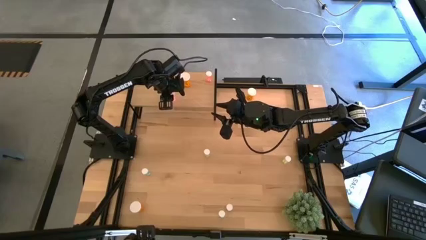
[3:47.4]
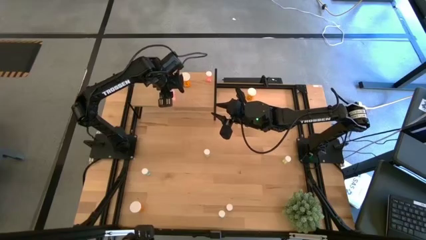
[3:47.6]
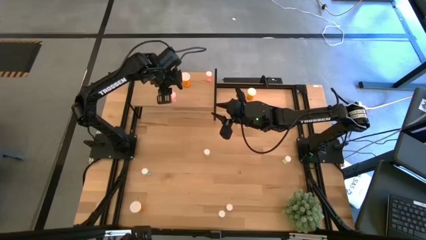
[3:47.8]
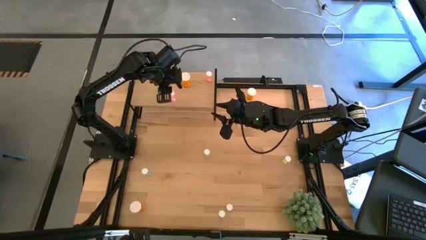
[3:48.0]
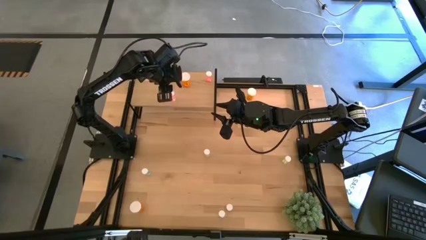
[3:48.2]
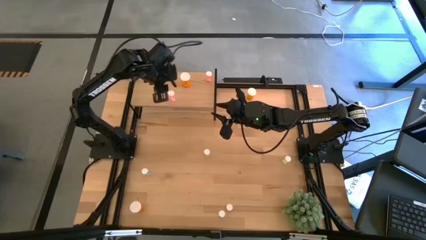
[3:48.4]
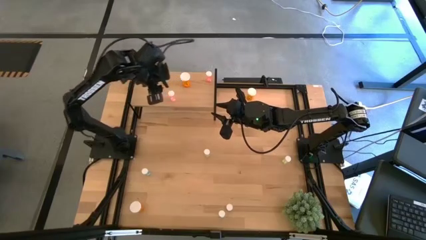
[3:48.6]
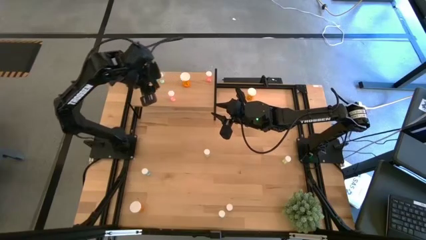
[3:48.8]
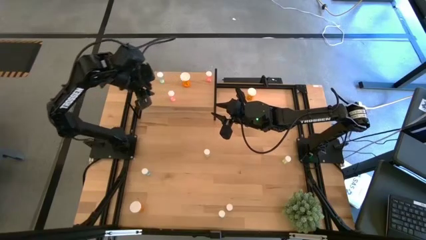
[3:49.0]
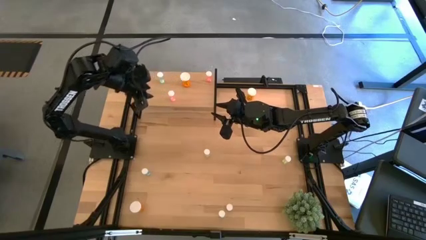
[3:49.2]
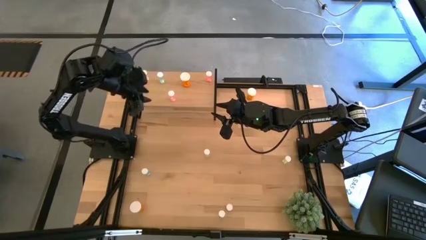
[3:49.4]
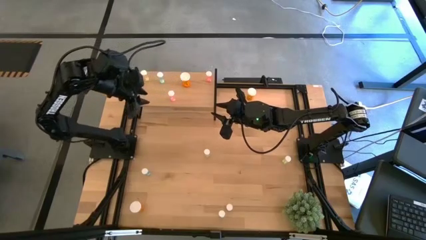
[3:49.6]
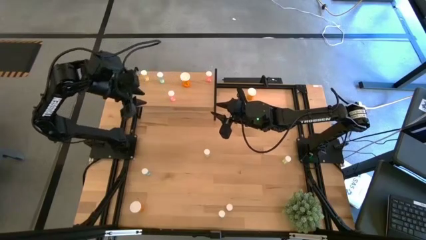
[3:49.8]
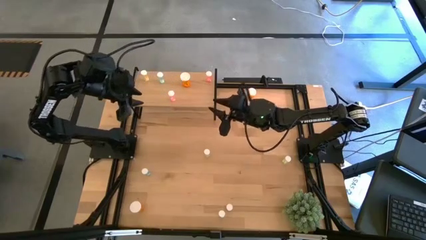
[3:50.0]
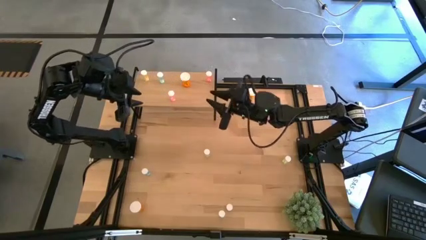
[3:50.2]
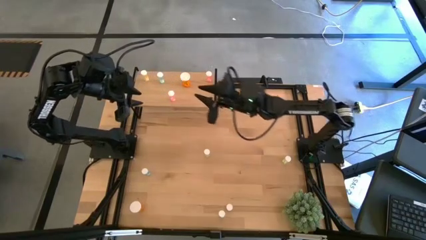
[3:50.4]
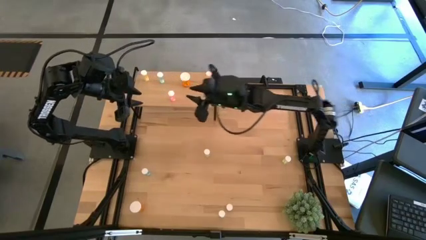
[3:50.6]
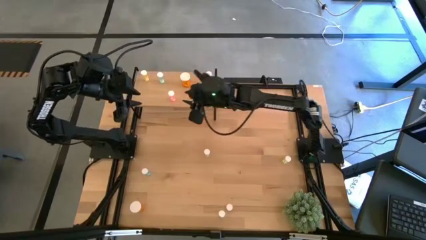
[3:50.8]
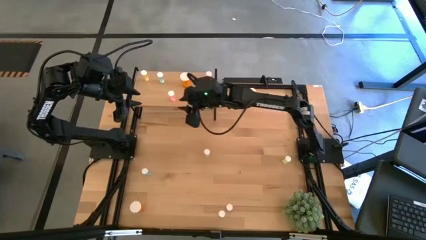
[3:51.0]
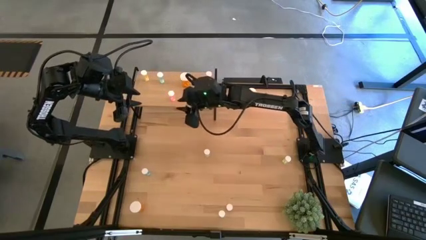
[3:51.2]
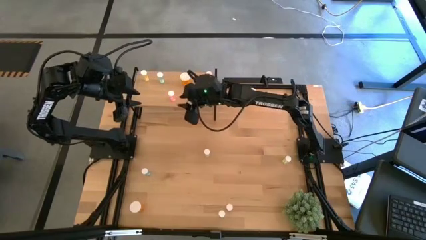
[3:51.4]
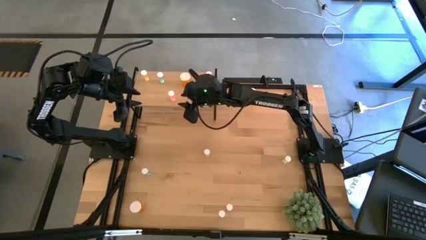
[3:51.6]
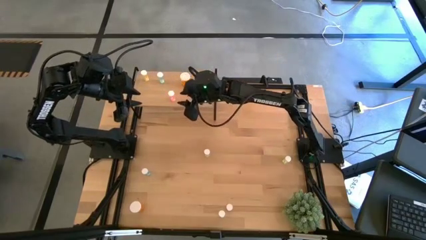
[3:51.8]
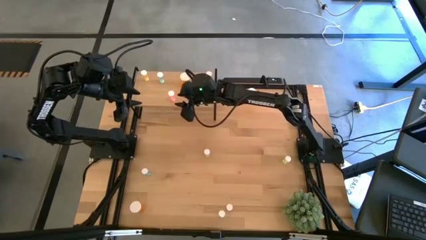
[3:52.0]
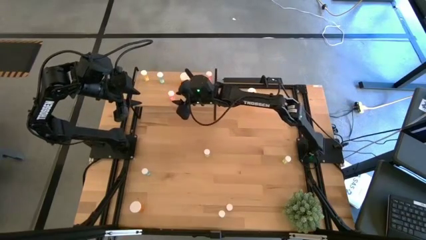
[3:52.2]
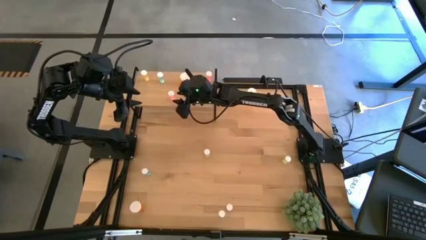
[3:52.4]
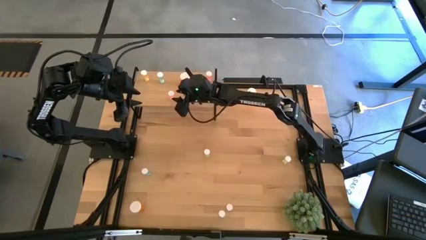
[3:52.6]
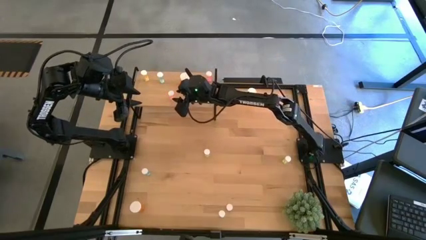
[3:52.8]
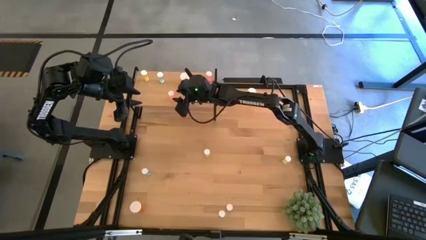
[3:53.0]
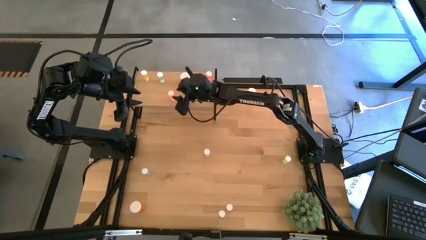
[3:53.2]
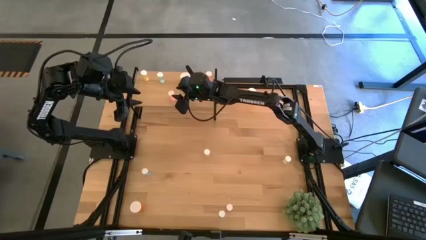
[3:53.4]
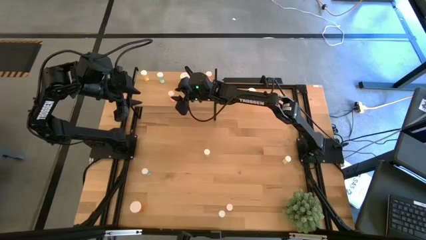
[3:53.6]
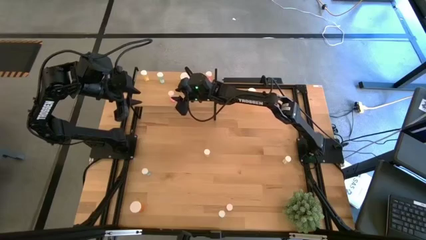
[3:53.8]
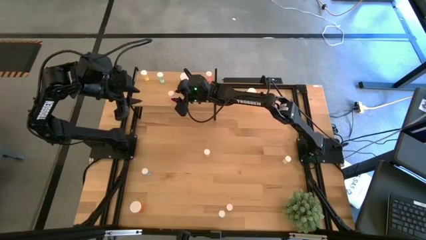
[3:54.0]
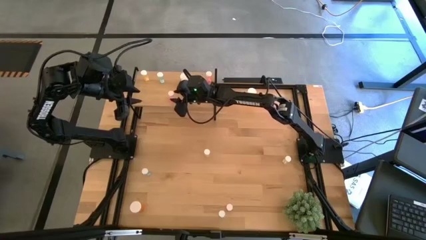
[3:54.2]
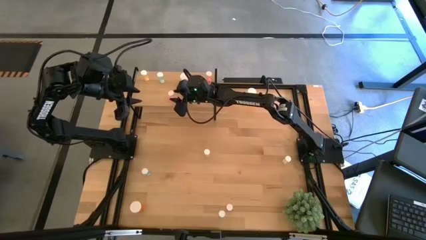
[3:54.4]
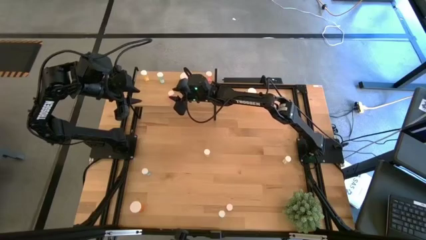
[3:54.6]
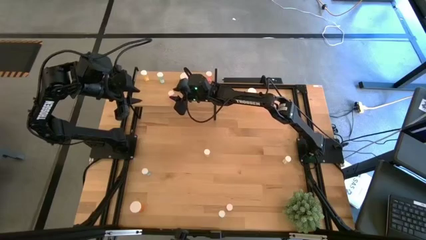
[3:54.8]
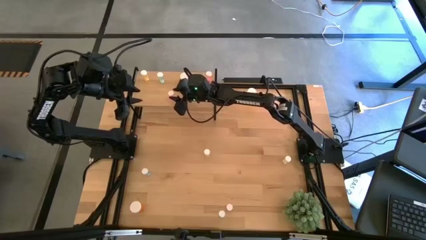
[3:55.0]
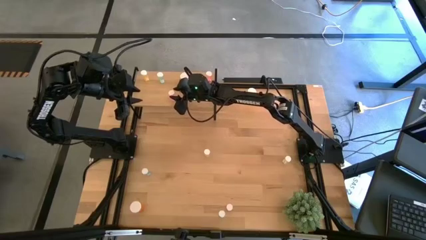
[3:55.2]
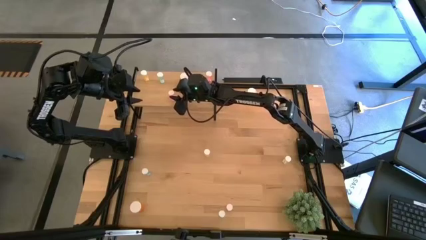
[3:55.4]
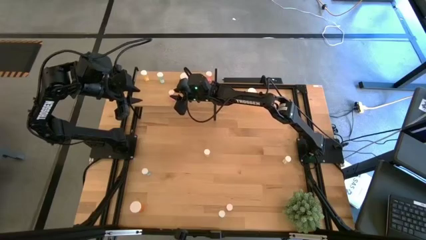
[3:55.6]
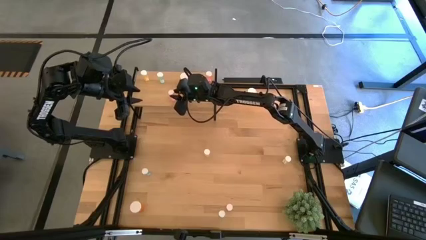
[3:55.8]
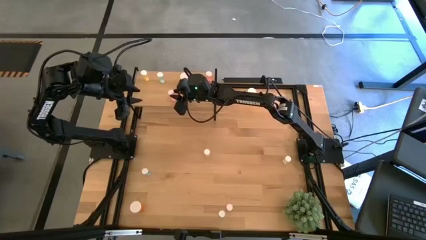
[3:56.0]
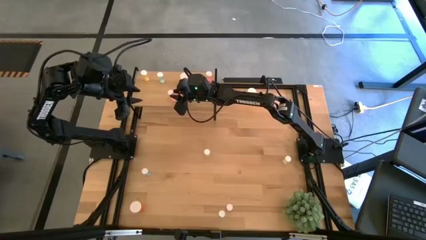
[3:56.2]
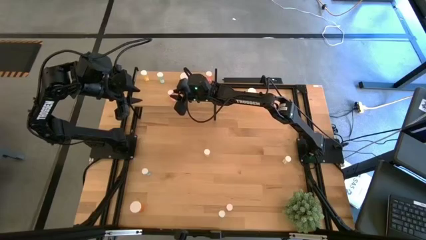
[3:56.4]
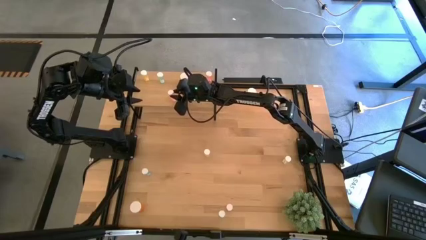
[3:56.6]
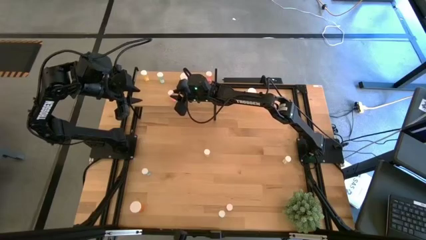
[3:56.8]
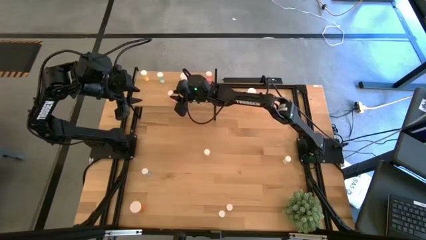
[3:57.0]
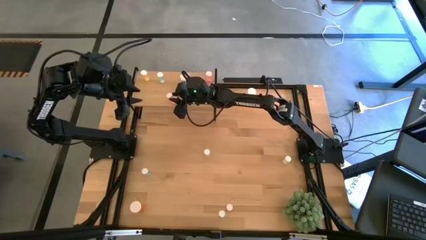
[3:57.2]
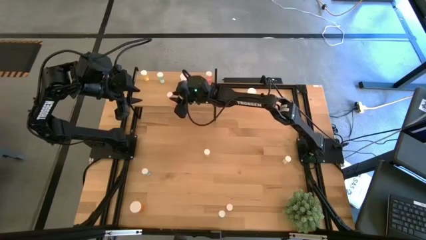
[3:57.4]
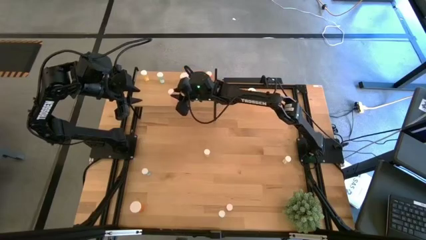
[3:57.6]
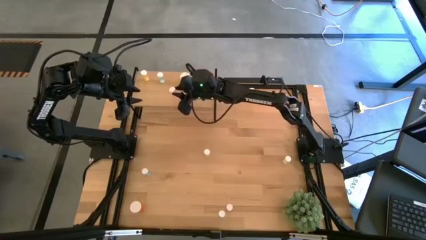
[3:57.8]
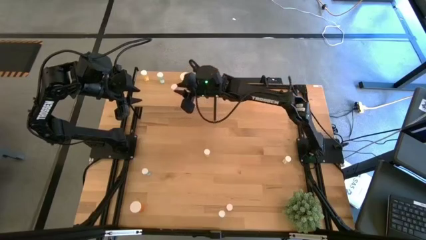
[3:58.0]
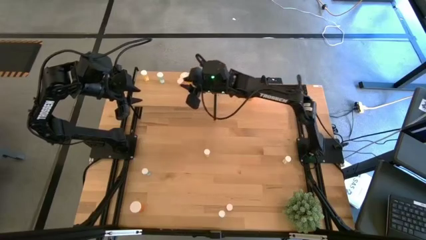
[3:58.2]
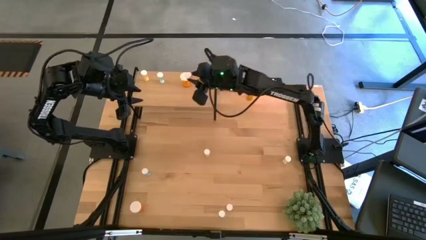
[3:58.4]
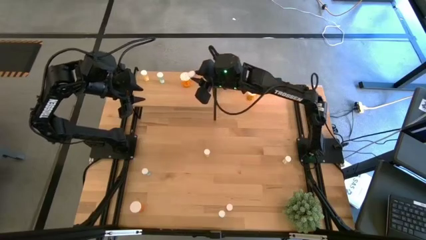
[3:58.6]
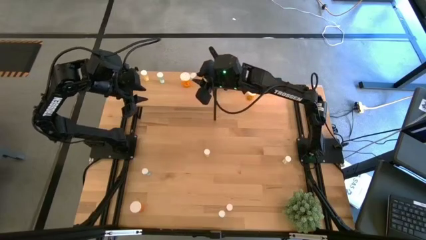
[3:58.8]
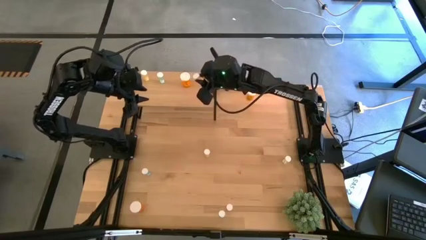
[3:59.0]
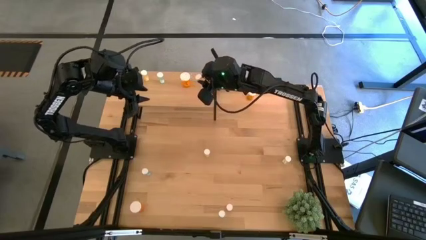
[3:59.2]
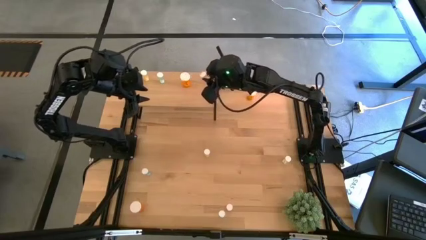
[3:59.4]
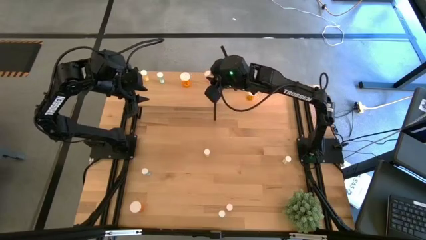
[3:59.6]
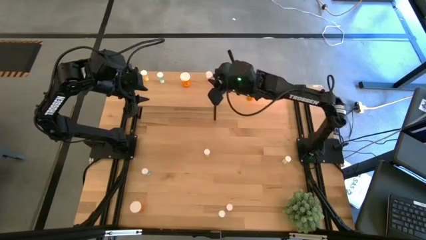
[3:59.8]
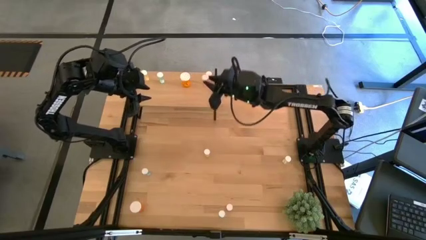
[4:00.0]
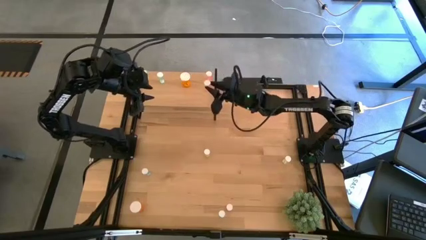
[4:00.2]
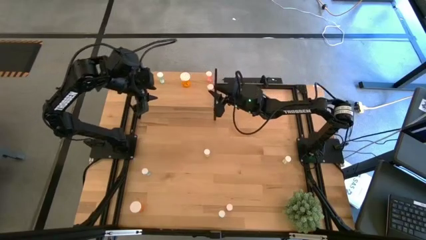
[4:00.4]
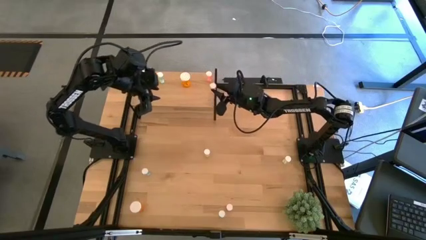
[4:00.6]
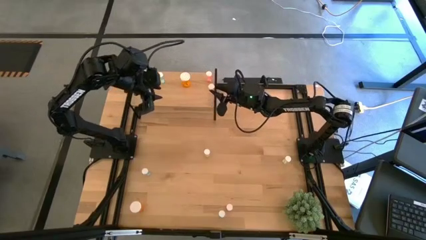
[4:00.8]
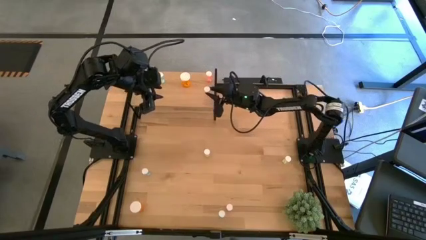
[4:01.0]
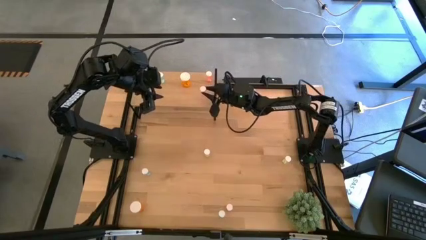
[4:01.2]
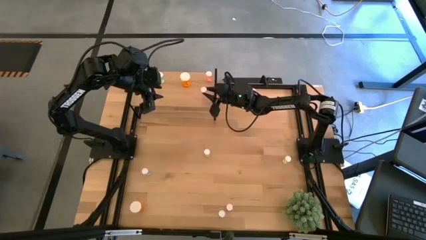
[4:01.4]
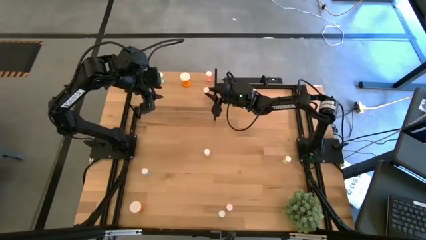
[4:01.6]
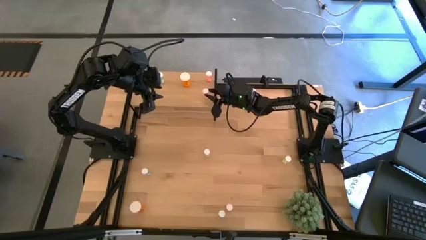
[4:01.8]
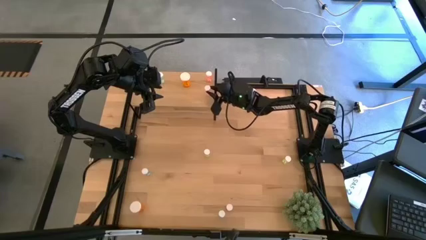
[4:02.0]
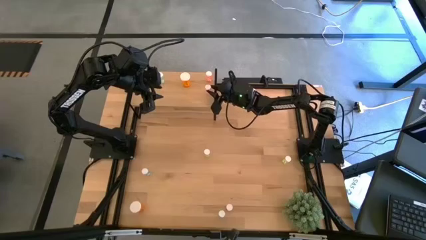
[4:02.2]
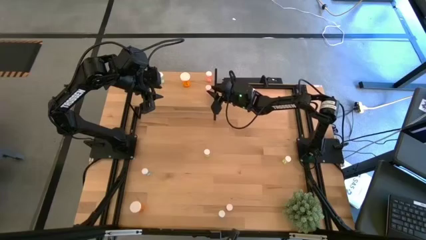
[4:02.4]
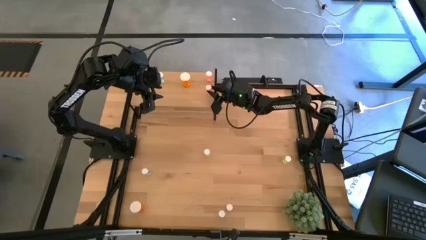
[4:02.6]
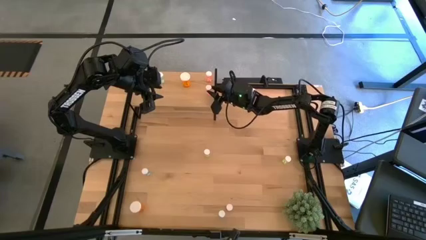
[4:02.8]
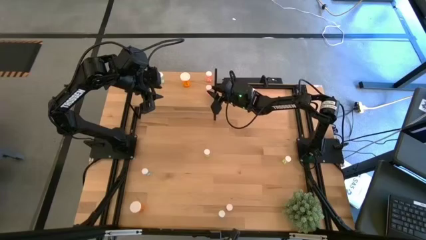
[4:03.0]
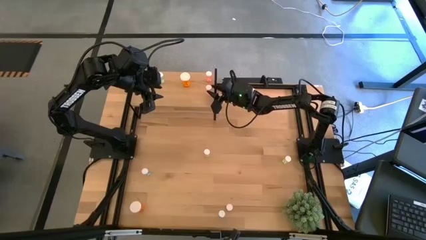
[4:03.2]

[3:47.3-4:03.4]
Task: Pick and place medicine bottles onto shelf by color
Put the top red pill bottle on the shelf aligned with the red pill bottle on the shelf
